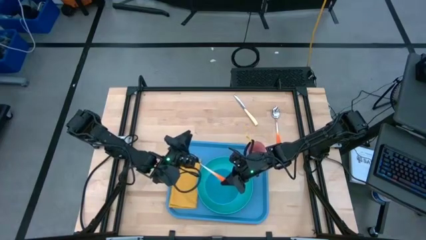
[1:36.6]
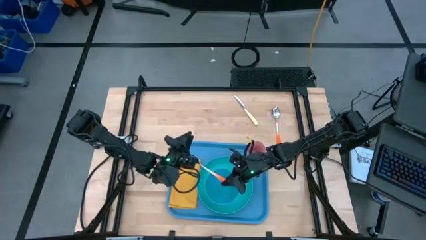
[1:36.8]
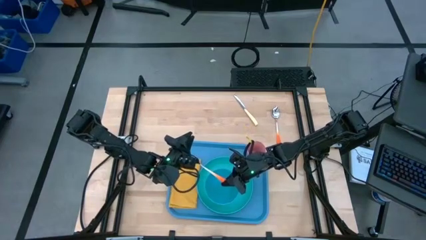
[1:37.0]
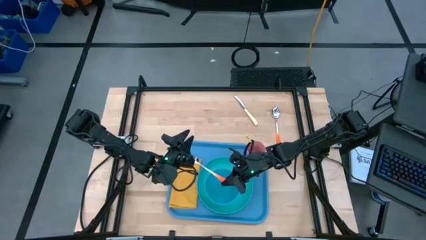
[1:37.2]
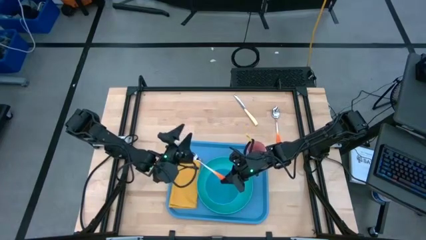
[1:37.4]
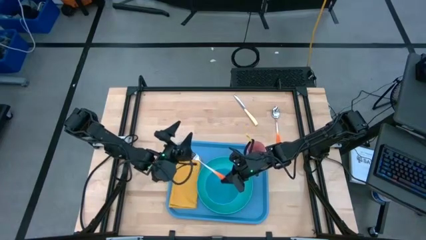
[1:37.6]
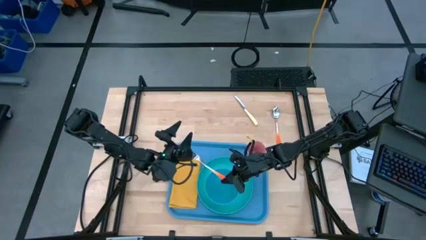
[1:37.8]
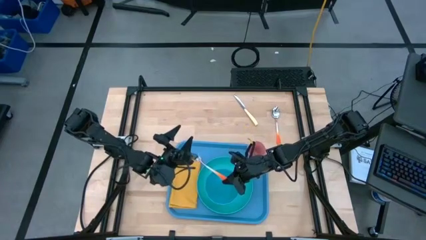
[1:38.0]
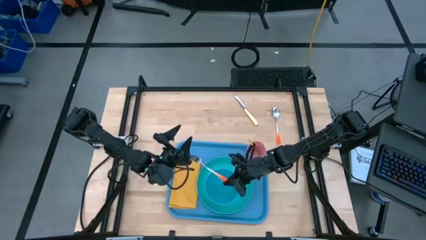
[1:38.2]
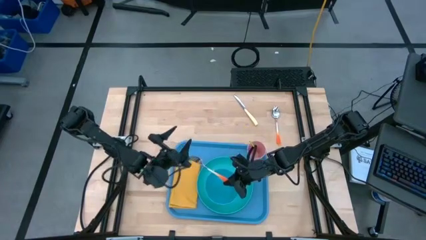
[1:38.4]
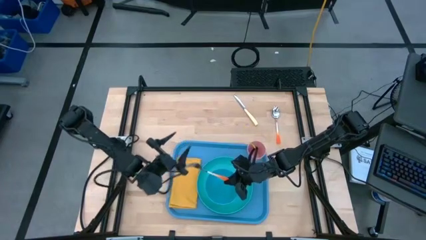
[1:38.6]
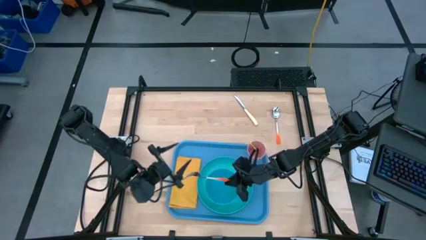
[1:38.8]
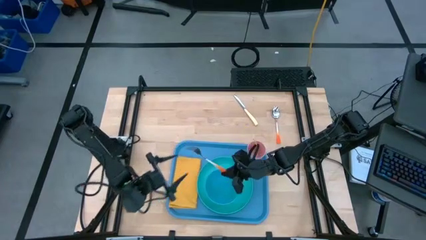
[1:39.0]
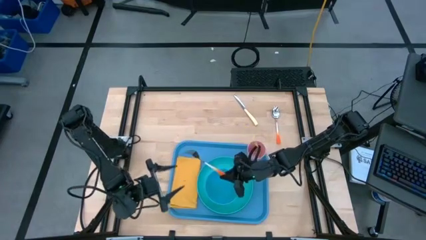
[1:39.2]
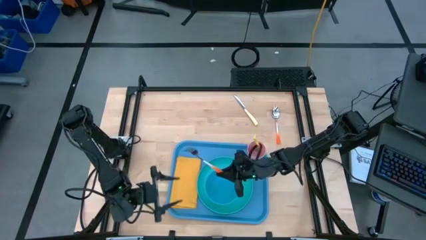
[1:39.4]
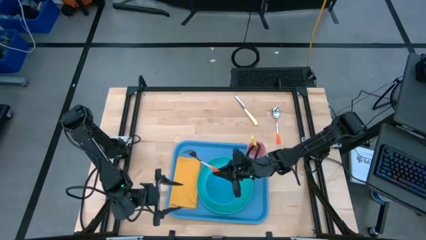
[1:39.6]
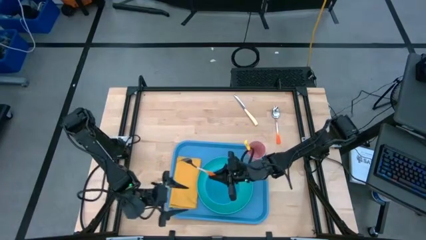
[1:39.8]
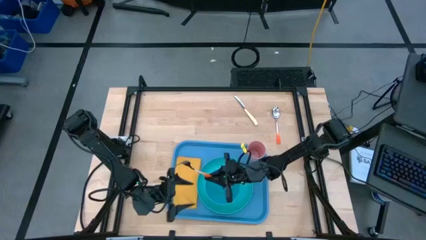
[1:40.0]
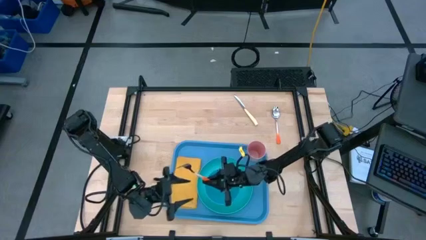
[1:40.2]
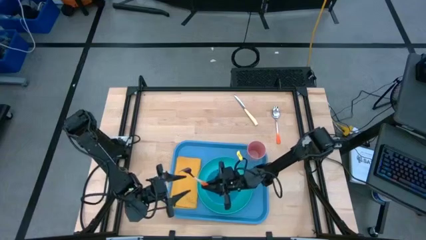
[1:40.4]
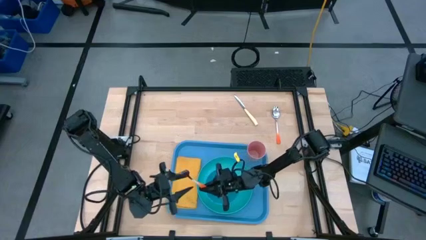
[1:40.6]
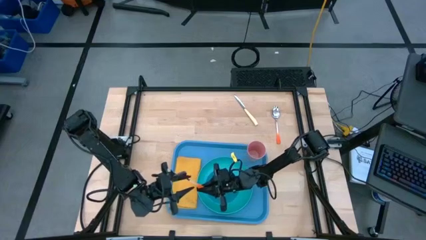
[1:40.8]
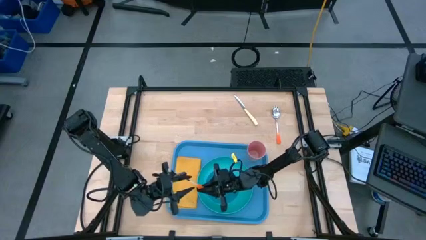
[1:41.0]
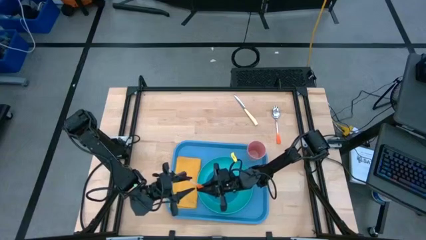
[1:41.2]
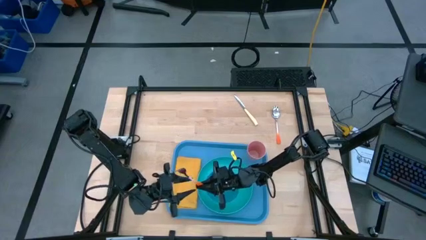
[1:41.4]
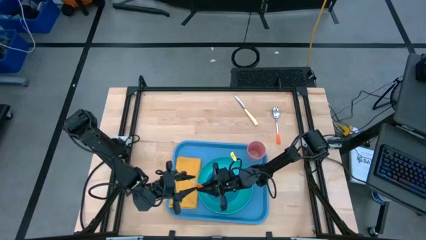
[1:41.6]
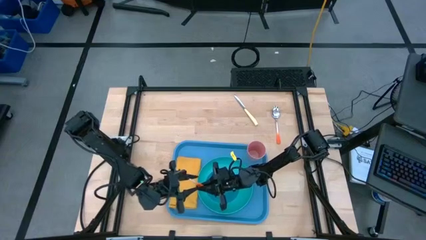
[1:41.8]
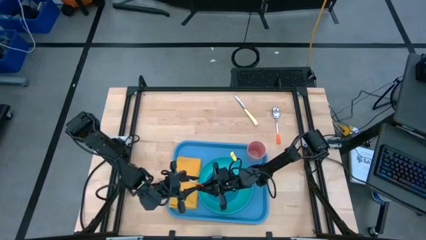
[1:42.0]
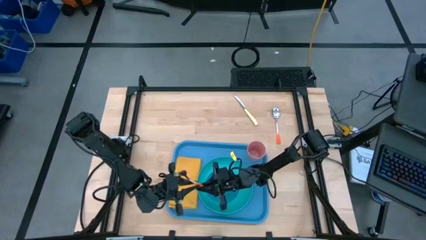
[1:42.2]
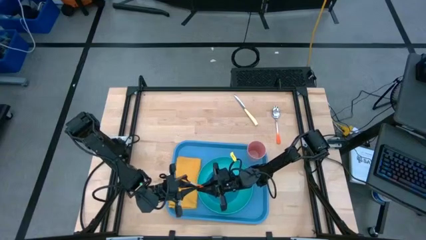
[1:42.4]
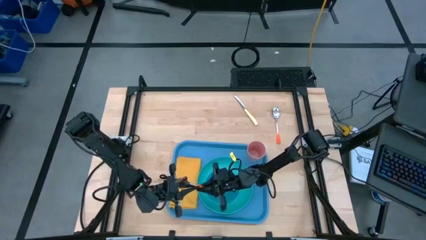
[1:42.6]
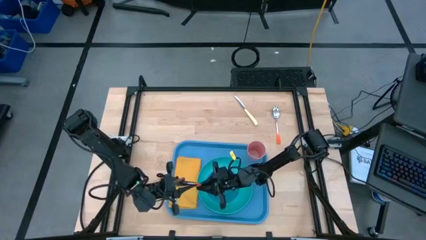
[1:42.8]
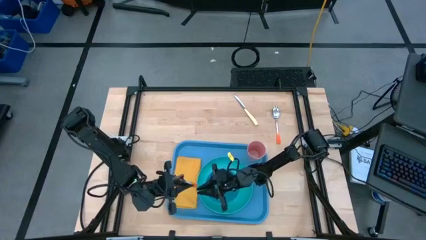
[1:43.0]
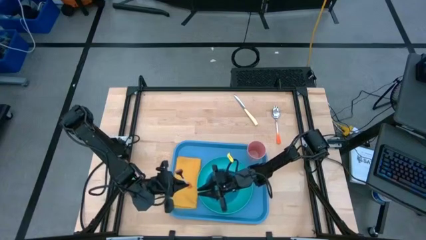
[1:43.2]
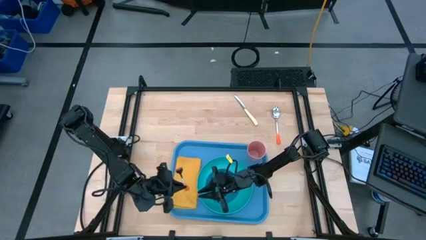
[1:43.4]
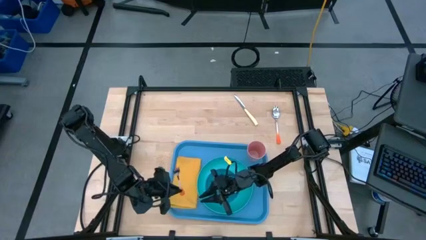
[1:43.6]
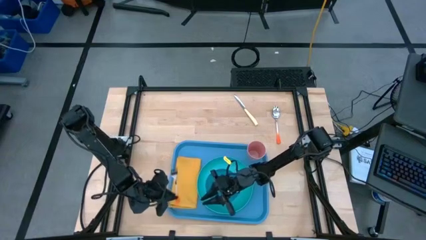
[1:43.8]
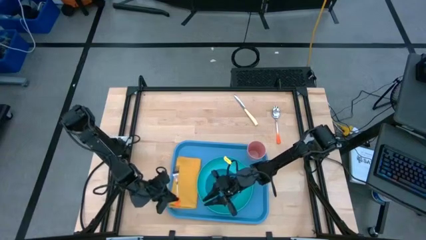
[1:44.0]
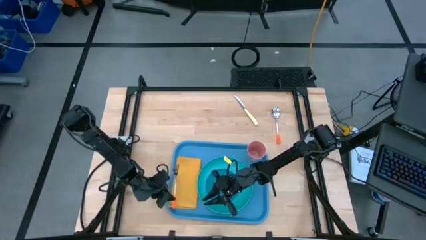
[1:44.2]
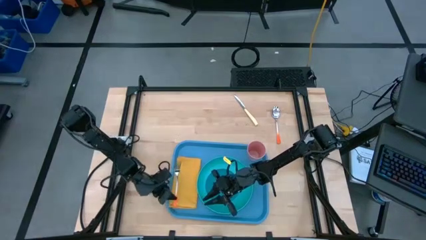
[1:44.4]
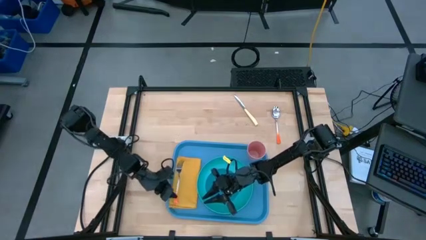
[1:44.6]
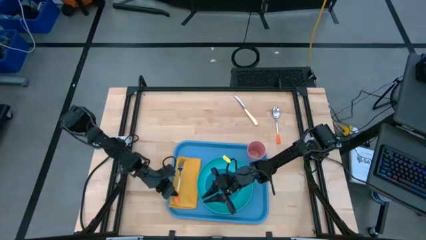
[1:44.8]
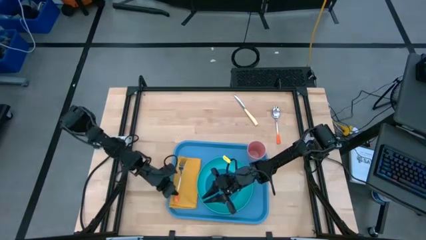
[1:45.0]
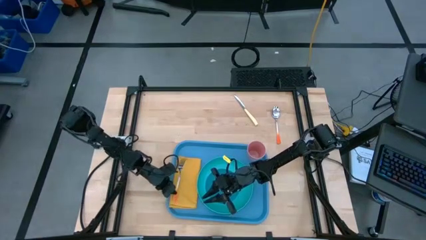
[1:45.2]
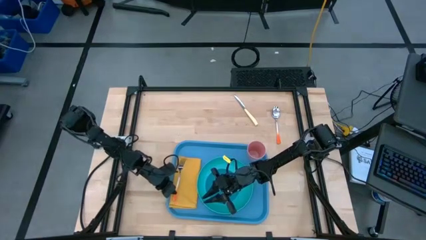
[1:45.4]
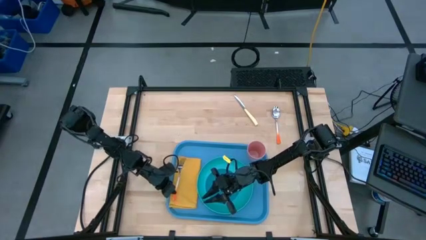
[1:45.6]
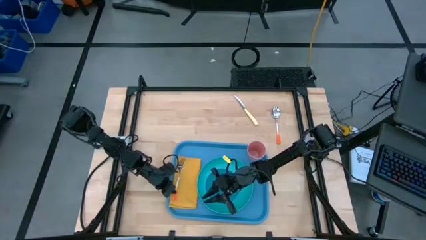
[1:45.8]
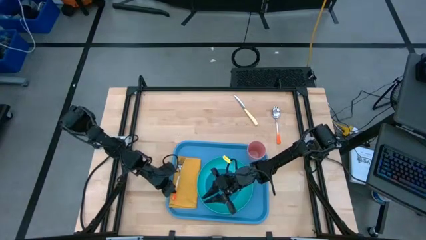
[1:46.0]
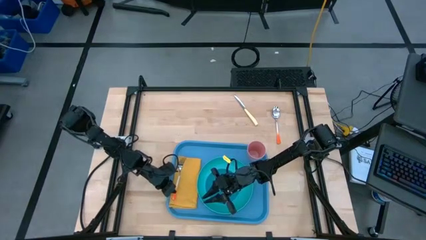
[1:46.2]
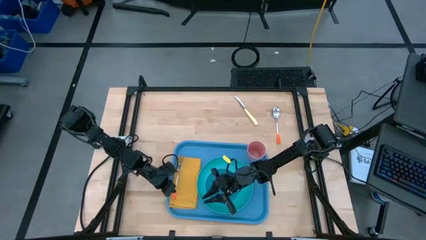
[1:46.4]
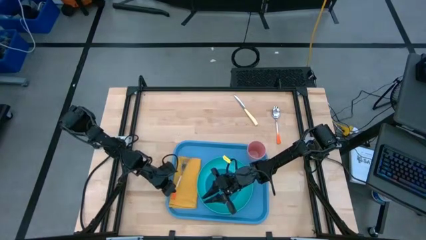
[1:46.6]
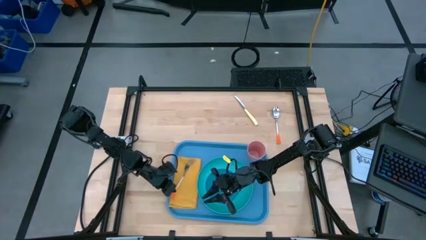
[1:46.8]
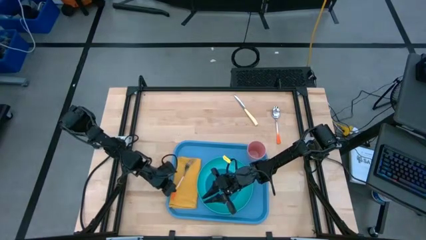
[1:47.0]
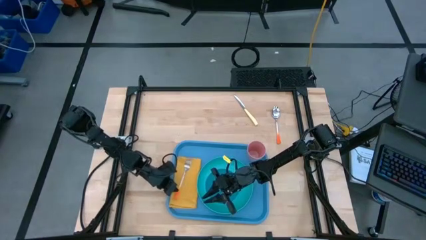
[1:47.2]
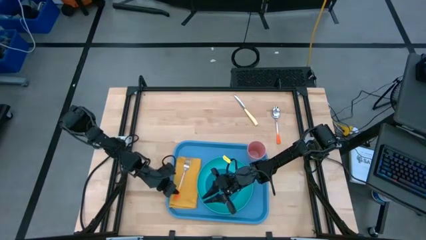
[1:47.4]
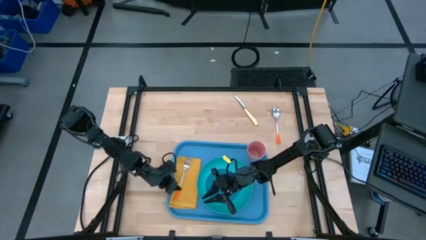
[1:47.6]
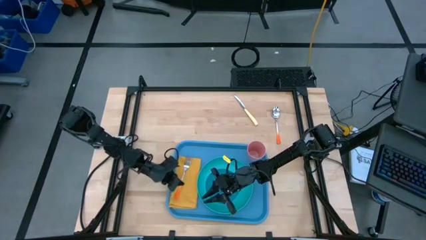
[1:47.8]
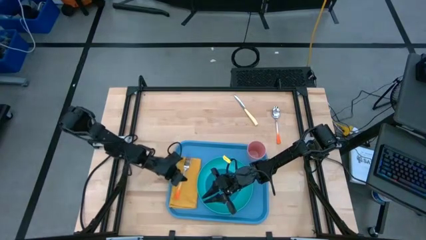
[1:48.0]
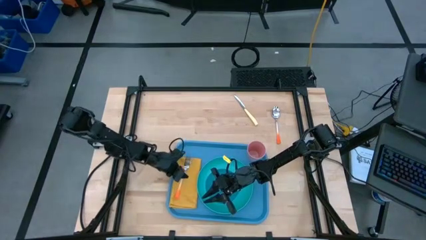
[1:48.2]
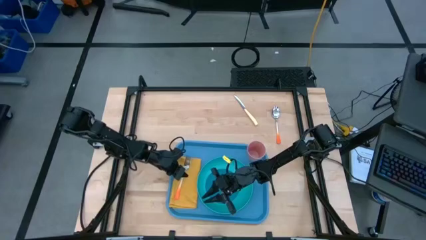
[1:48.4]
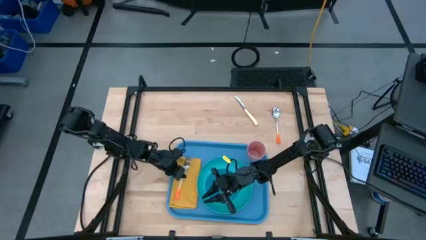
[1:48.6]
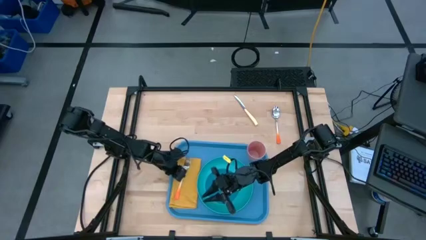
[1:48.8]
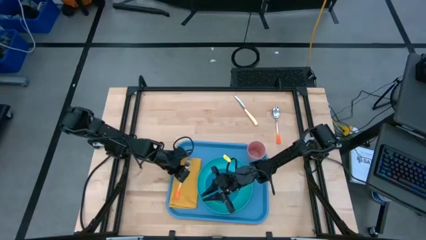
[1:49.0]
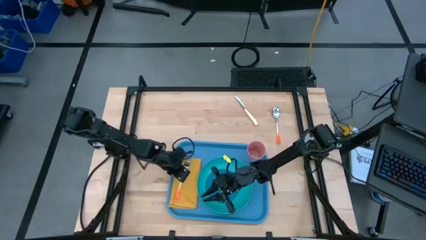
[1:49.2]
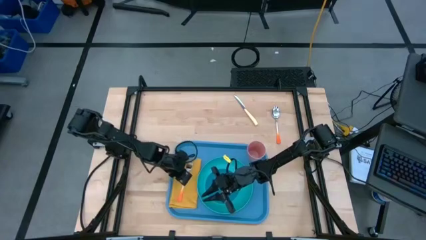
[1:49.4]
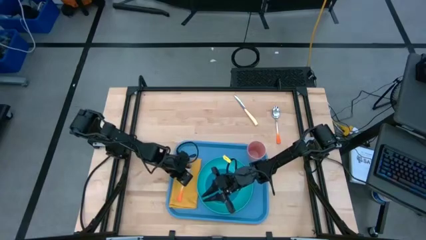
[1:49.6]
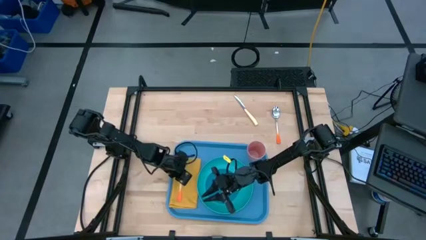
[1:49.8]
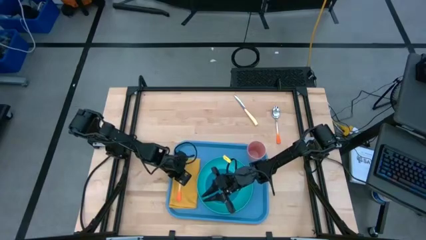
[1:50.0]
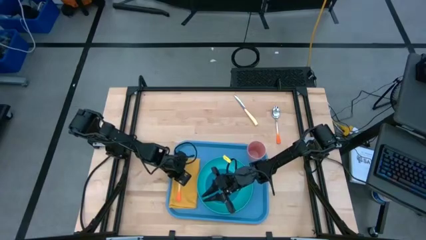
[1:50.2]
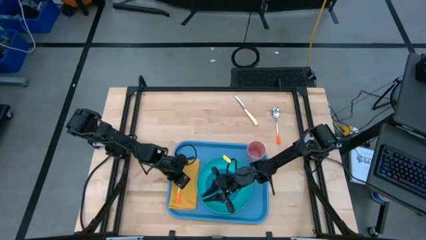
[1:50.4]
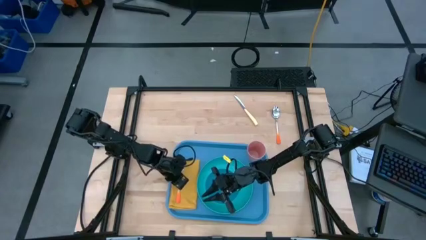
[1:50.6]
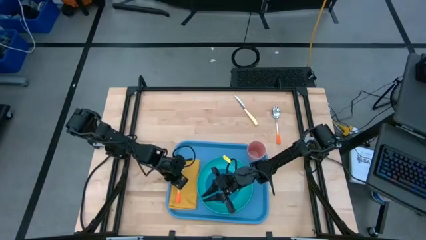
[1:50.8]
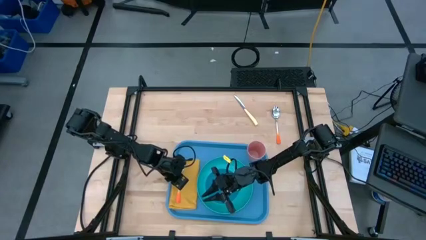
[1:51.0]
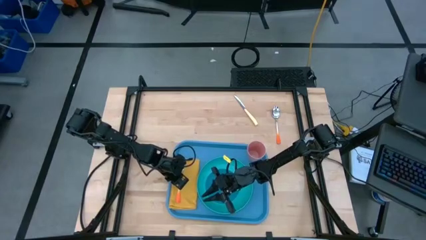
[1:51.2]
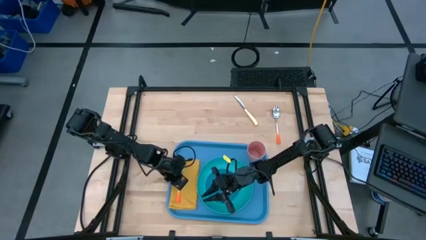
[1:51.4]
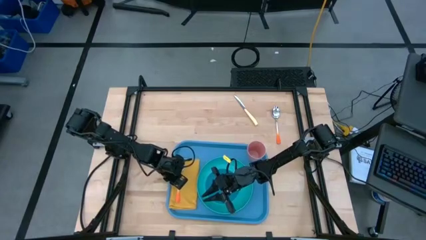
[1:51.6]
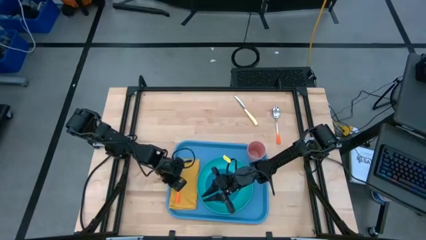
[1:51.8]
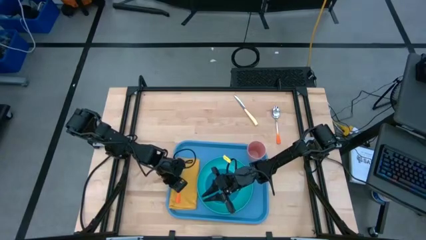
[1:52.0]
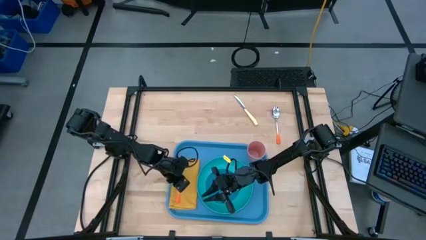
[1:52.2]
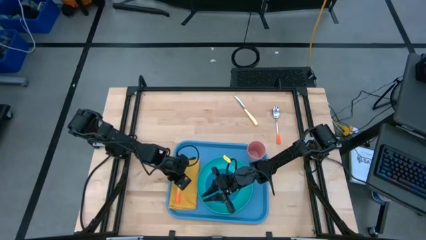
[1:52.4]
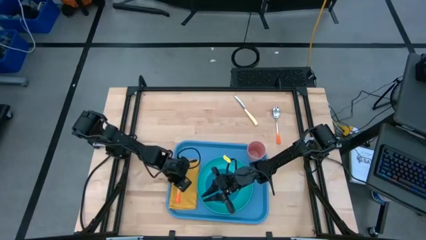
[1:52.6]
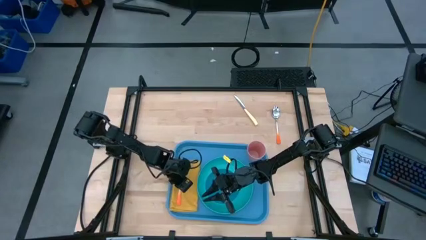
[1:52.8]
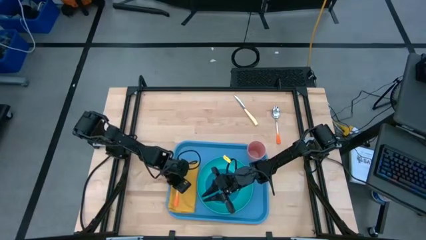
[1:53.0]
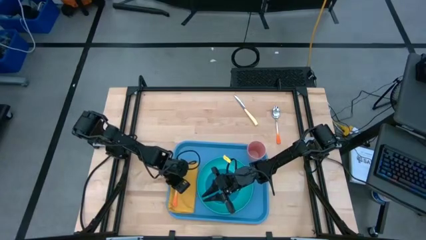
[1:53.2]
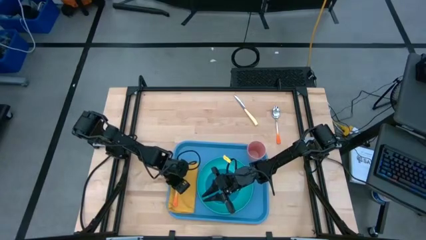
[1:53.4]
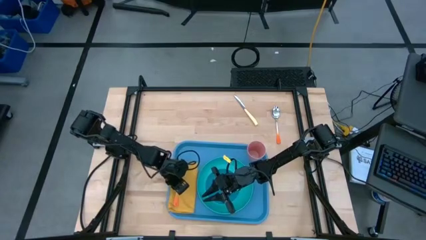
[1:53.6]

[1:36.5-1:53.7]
Task: Set up tray
Put the orange fork on the top of the yellow table napkin
